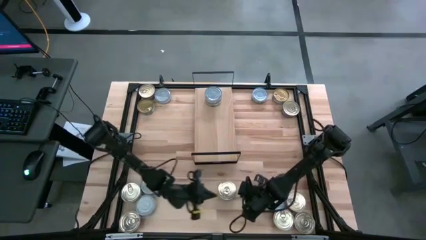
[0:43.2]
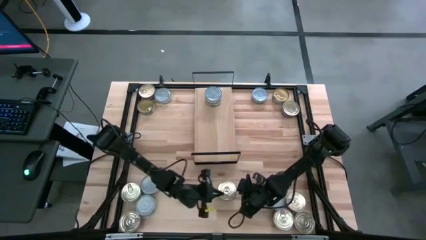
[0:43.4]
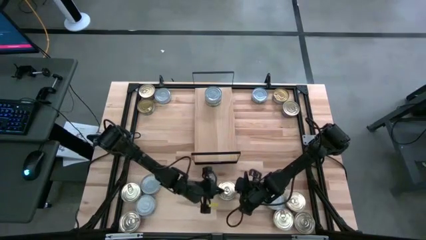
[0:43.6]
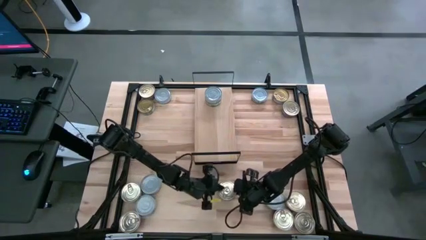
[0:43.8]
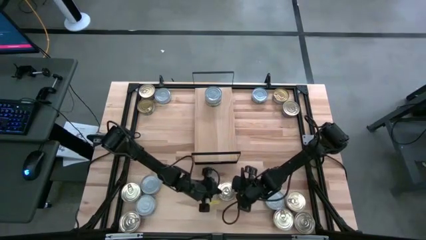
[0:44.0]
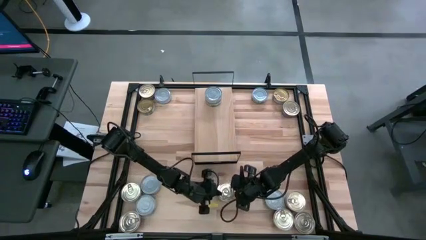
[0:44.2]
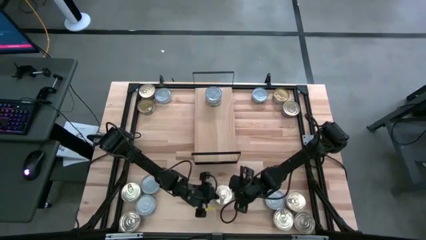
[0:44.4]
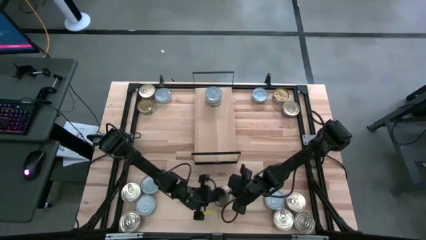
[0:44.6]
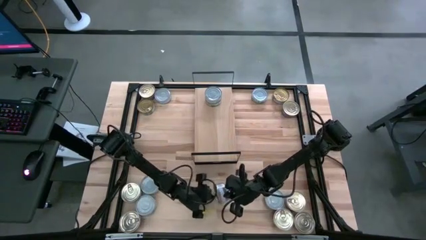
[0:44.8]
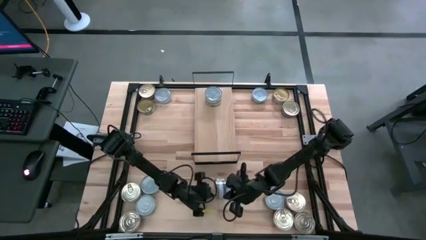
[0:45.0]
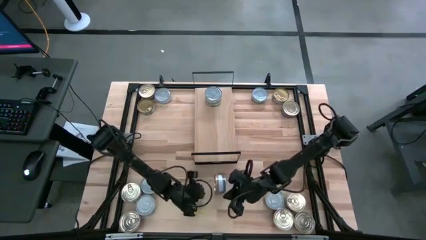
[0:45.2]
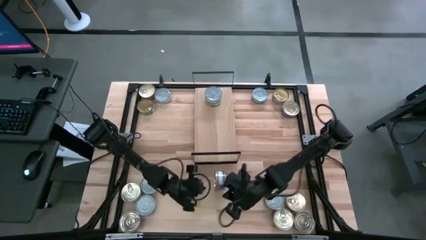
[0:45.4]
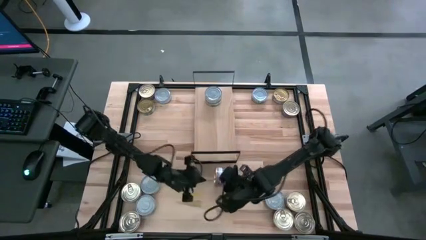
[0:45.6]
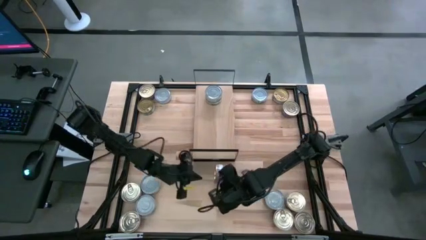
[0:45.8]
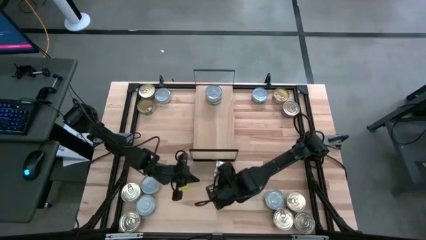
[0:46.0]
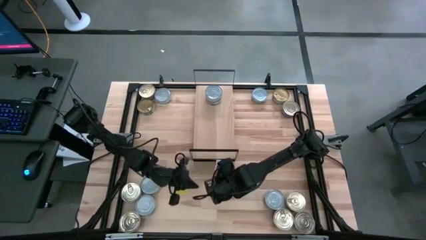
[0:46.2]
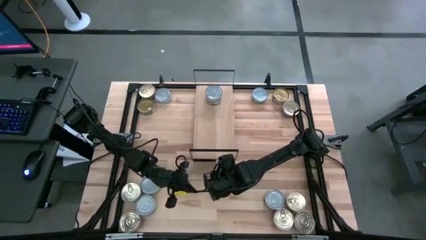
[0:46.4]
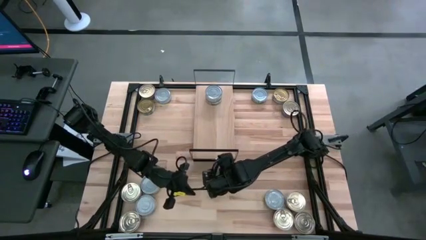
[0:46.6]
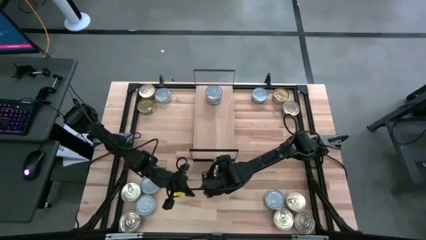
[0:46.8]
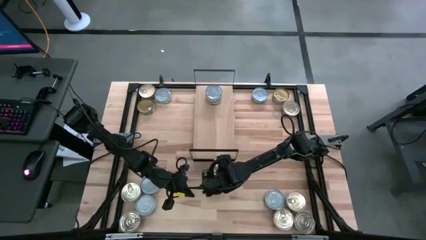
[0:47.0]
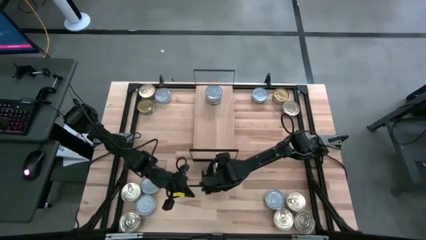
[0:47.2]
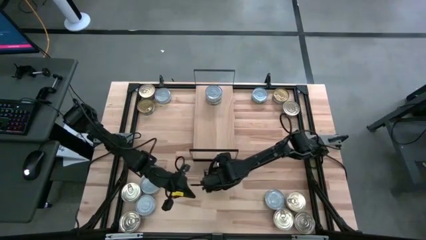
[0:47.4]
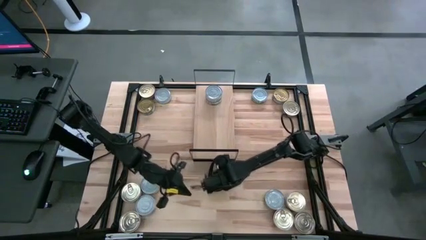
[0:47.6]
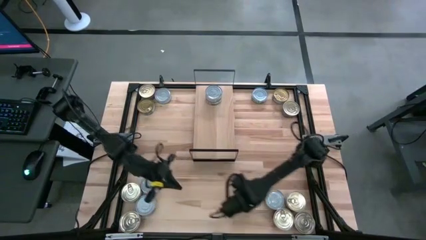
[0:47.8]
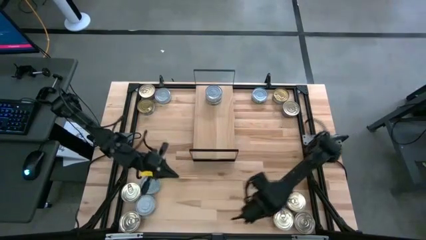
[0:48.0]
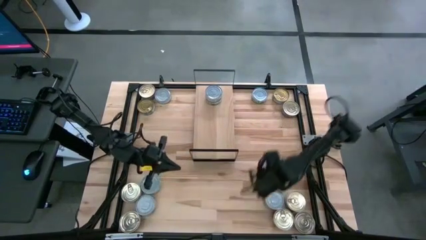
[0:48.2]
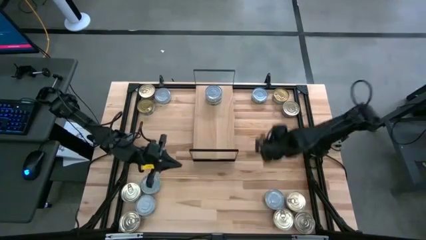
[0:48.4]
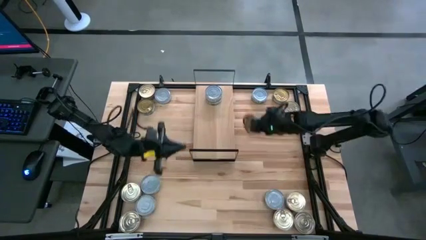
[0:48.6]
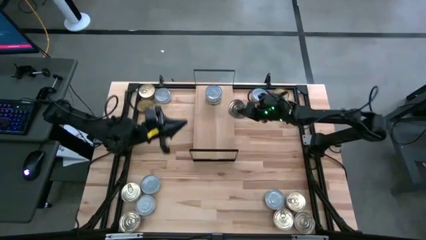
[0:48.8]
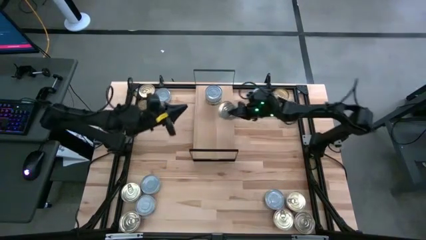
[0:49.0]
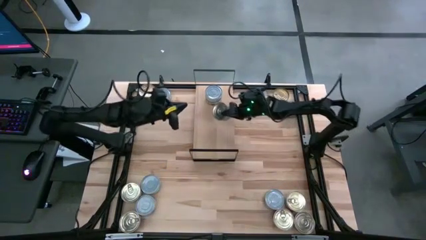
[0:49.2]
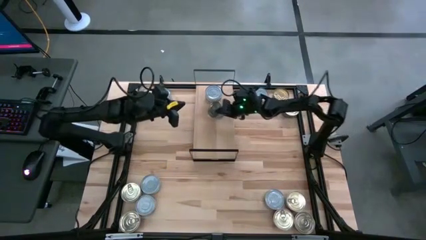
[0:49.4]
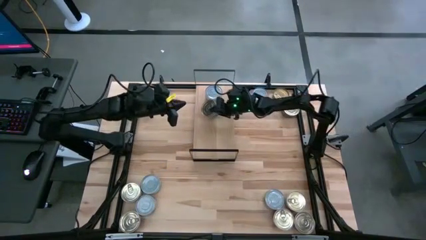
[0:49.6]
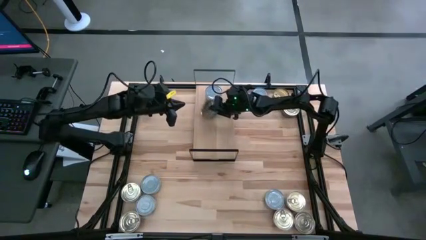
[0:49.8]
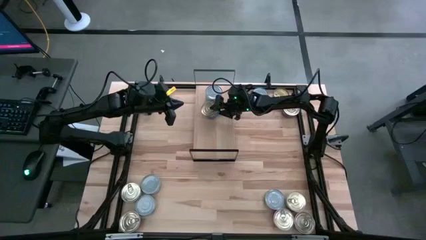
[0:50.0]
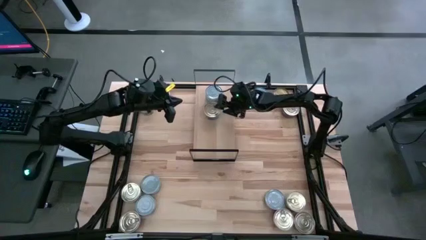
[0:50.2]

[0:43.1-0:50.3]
Task: Stack canned seafood by type on shelf
Put the pink and blue tuna can on the shelf

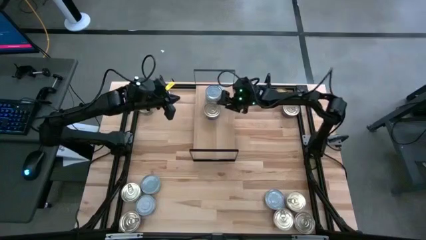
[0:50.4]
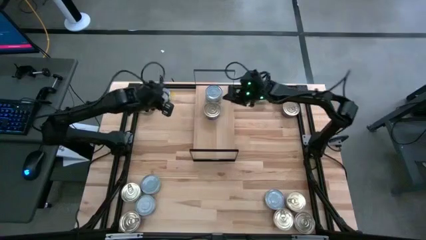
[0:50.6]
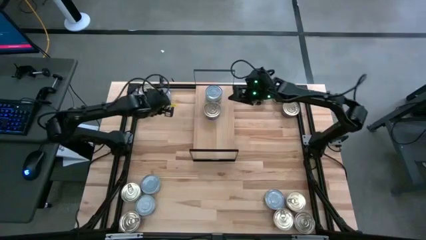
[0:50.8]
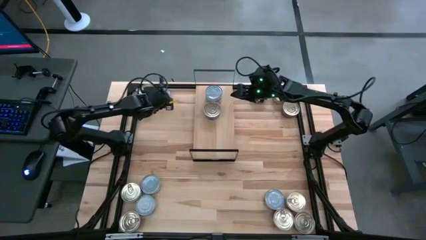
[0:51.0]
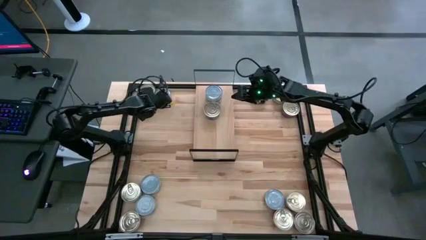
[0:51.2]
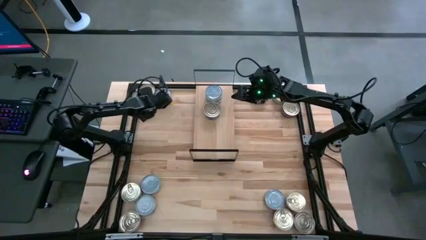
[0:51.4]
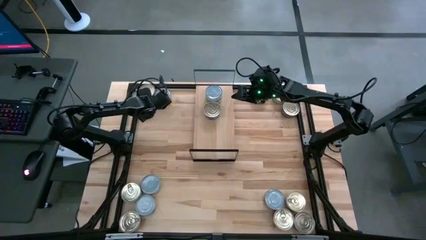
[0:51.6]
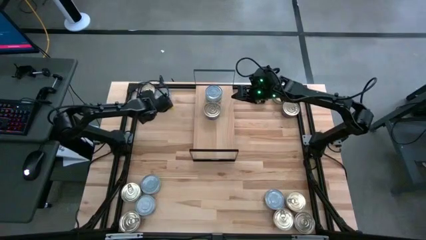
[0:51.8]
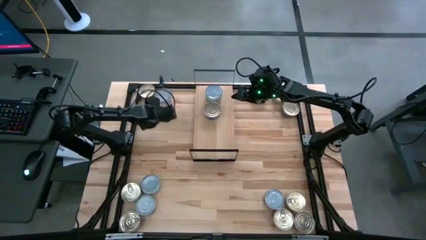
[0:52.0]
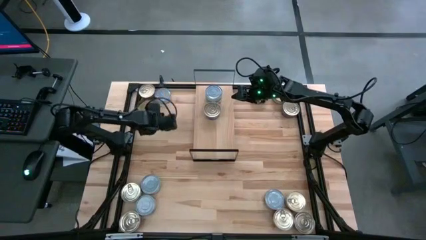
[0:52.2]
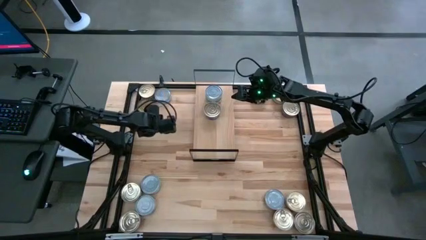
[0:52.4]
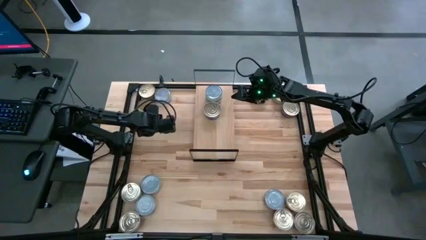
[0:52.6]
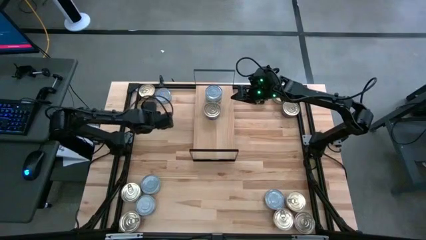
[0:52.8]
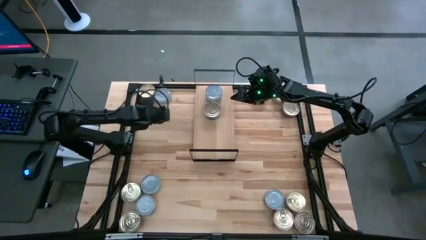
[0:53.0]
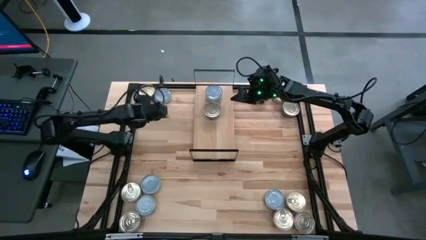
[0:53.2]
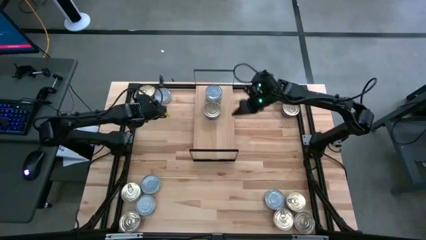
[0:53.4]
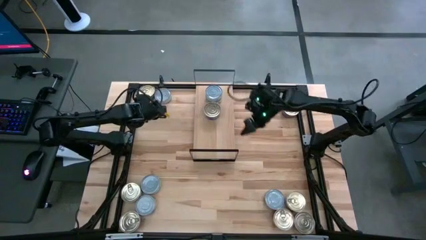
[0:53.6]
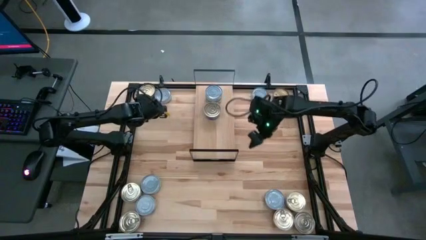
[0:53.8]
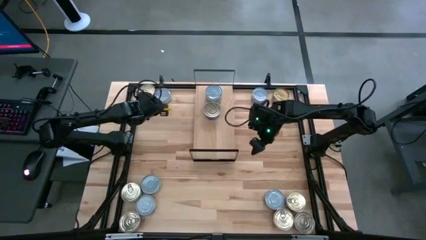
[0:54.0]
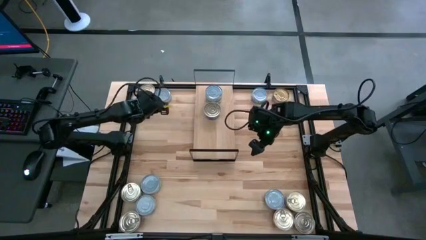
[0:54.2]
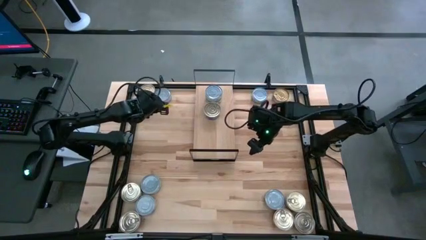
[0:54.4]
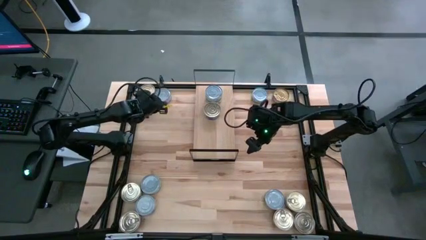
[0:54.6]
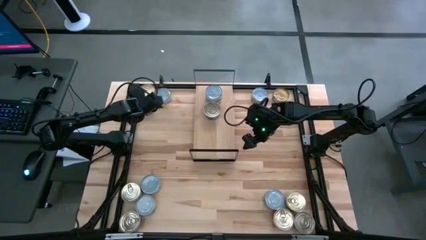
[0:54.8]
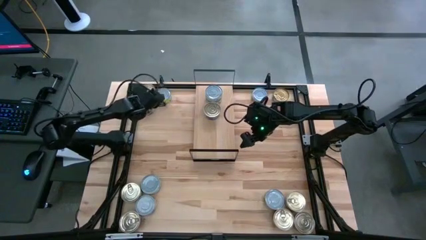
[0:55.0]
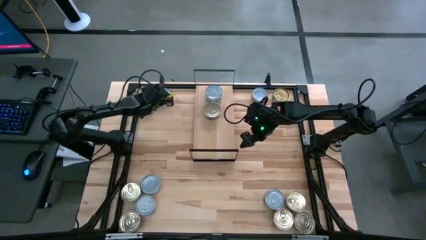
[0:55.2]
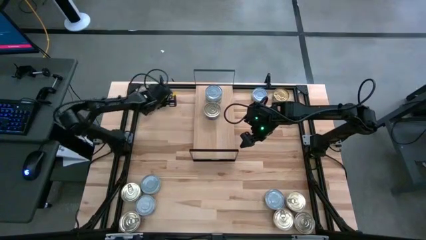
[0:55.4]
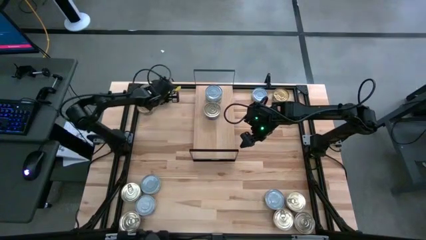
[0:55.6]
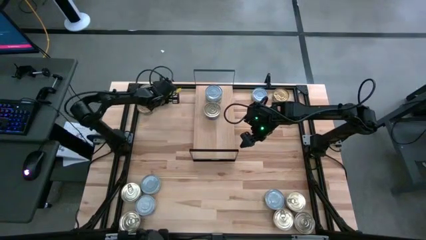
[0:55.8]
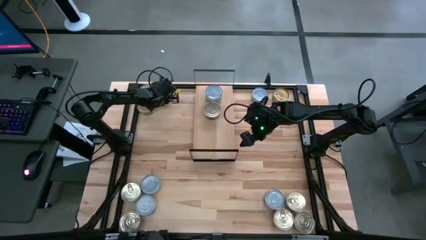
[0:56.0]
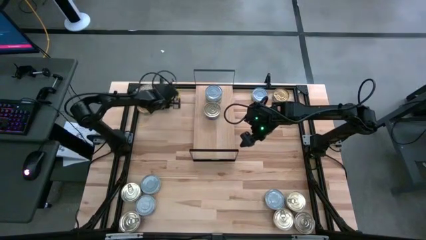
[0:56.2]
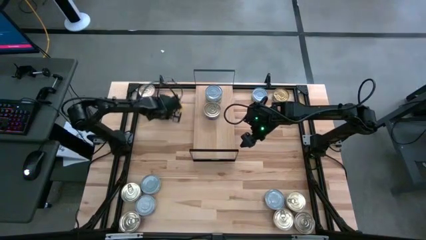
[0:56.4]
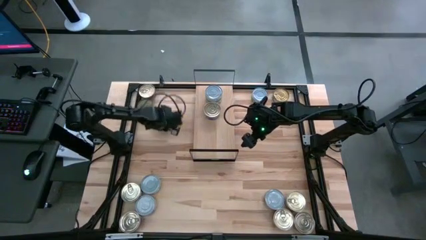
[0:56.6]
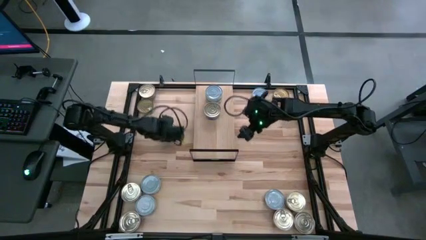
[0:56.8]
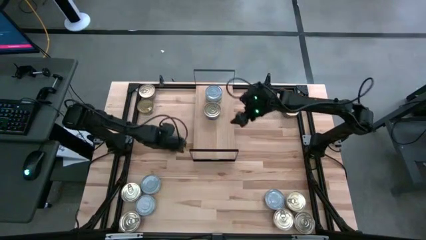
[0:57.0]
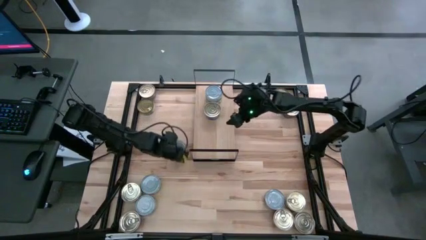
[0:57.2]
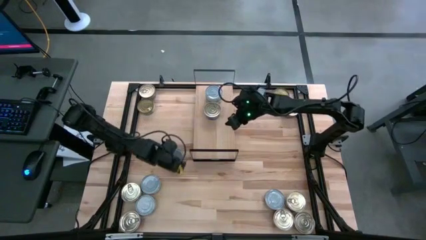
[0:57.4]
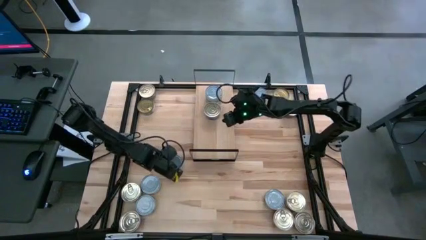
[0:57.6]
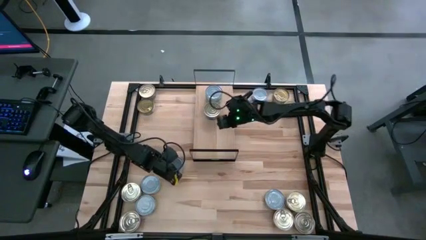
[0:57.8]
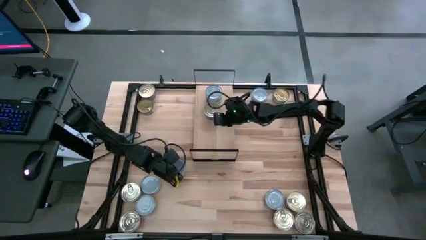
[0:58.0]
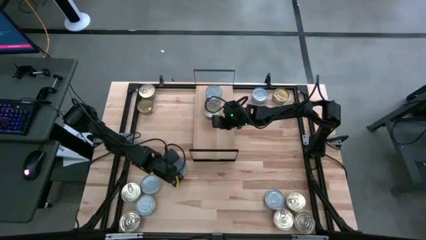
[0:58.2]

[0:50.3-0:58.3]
Move the green tuna can to the middle left of the table

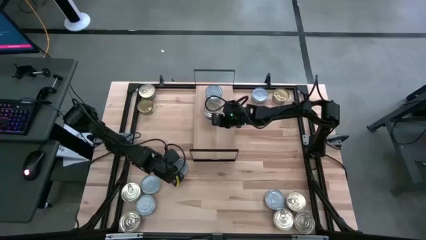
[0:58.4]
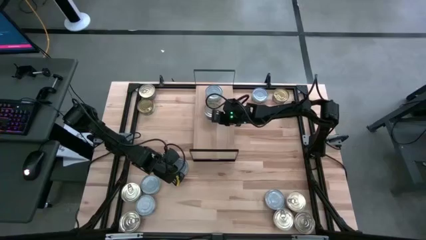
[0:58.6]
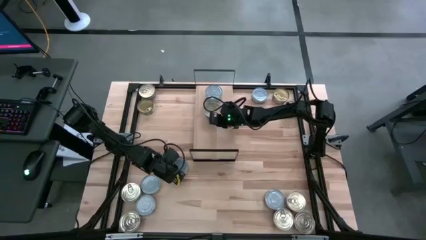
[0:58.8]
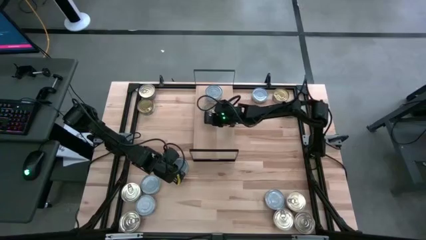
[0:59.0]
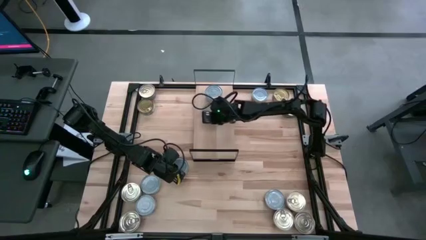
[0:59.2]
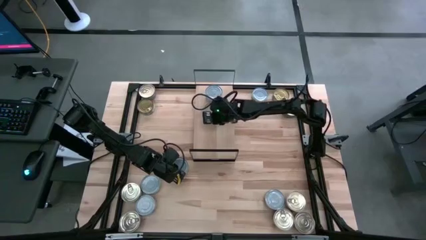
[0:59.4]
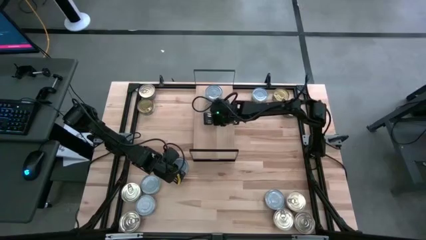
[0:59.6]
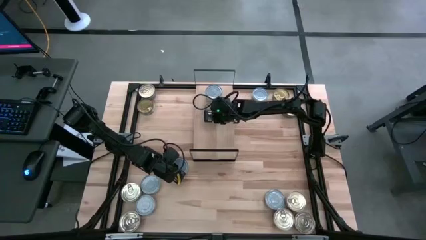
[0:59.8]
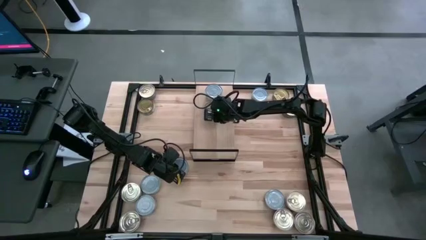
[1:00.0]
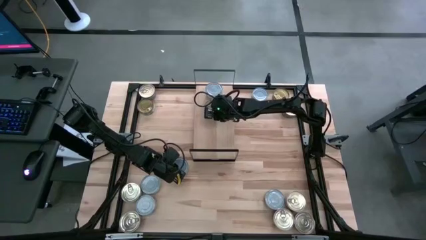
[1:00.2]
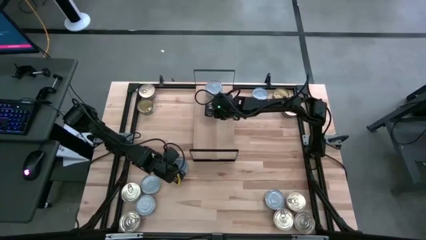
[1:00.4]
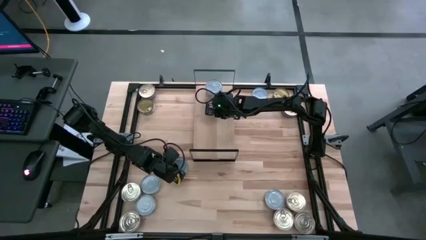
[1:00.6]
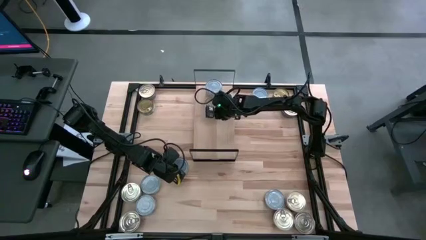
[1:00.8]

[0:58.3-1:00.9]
Adjust the pink and blue tuna can
